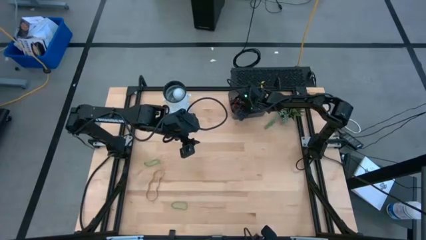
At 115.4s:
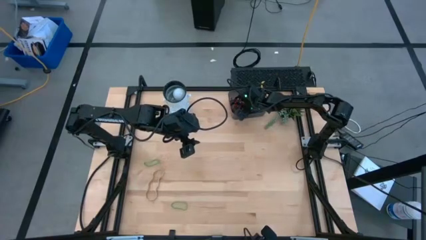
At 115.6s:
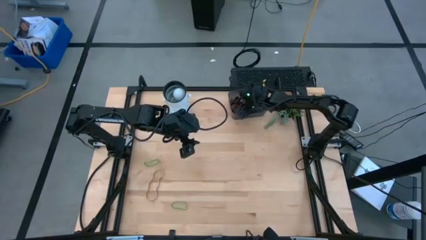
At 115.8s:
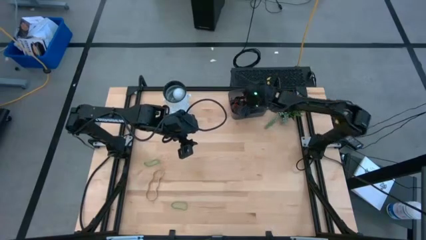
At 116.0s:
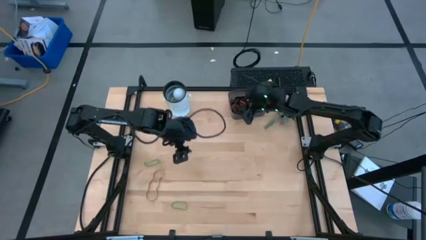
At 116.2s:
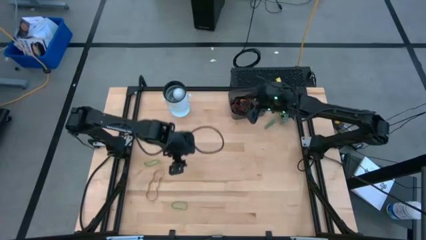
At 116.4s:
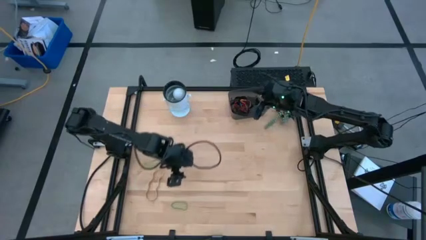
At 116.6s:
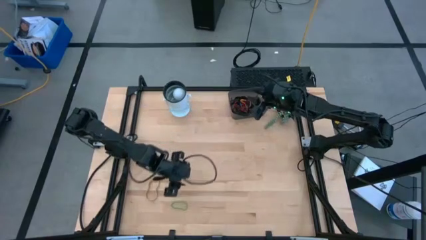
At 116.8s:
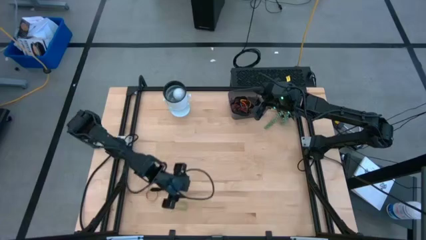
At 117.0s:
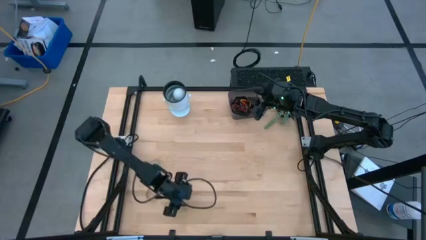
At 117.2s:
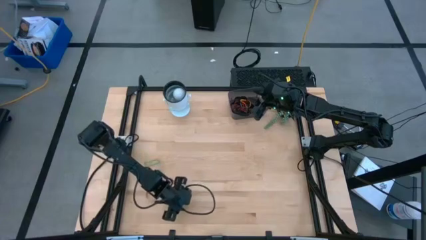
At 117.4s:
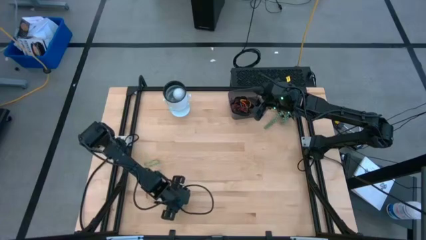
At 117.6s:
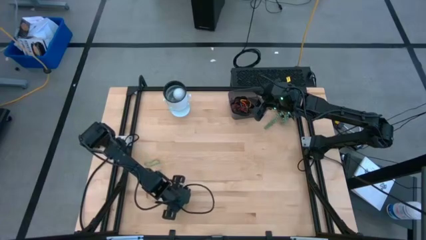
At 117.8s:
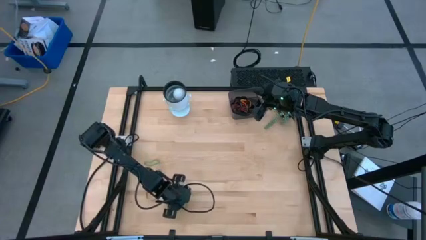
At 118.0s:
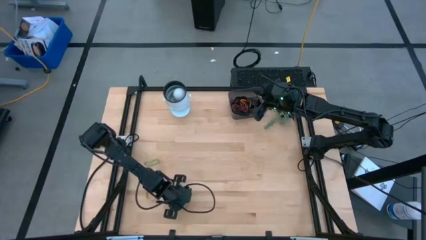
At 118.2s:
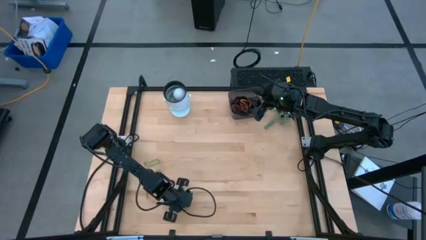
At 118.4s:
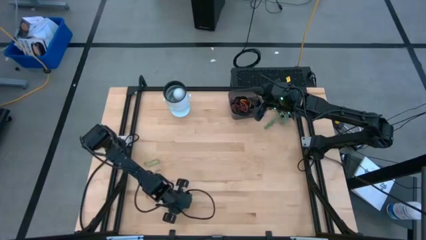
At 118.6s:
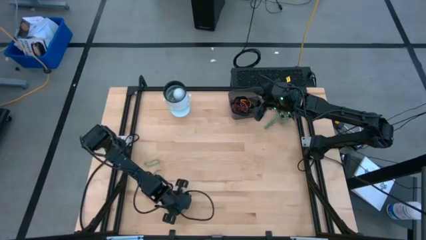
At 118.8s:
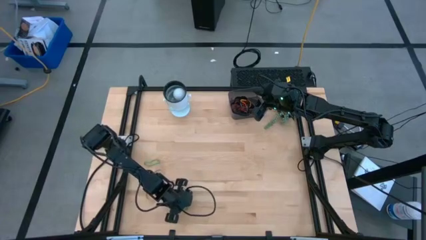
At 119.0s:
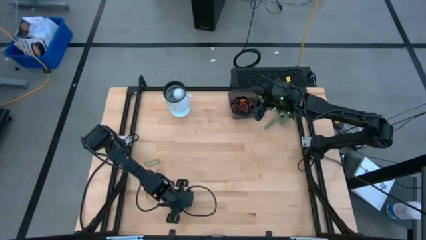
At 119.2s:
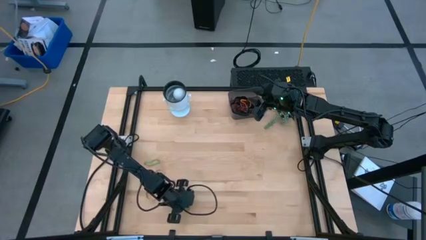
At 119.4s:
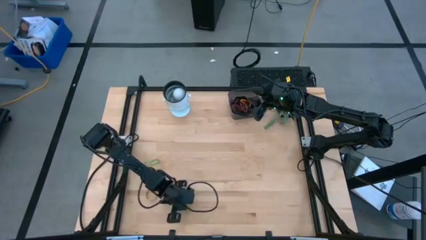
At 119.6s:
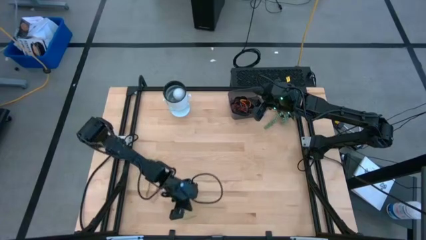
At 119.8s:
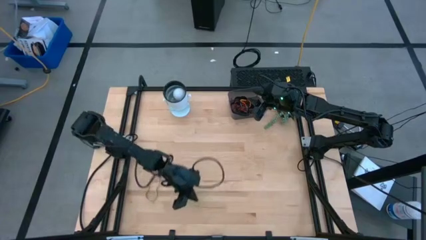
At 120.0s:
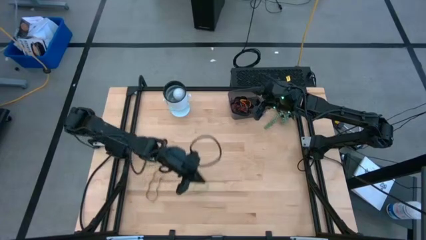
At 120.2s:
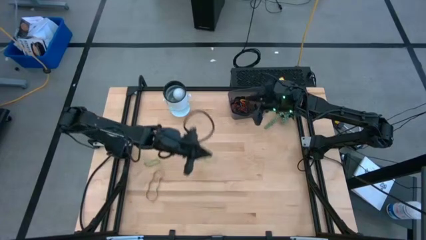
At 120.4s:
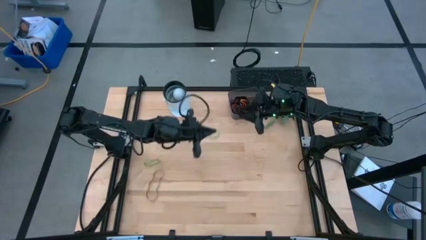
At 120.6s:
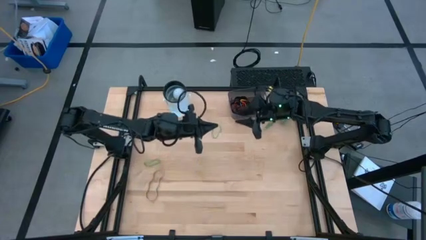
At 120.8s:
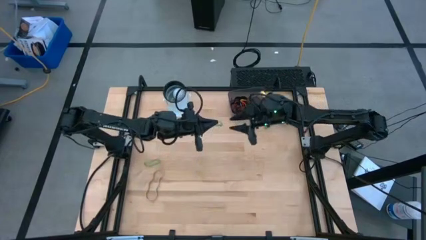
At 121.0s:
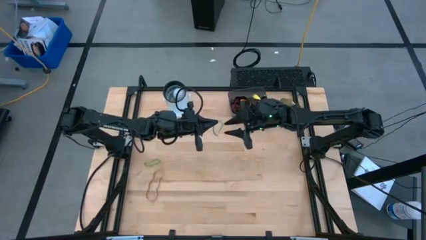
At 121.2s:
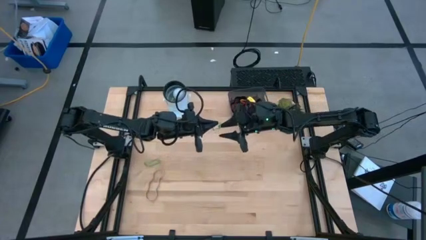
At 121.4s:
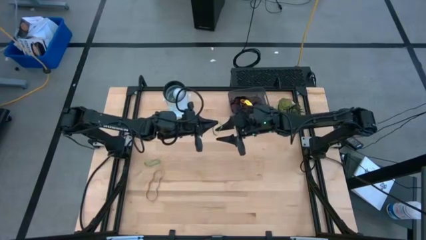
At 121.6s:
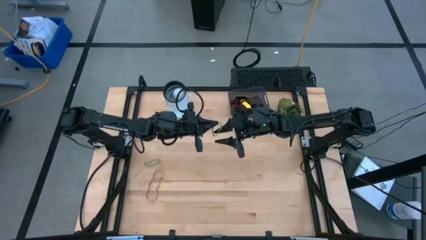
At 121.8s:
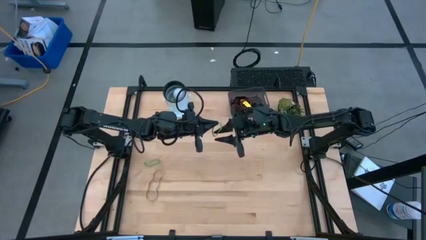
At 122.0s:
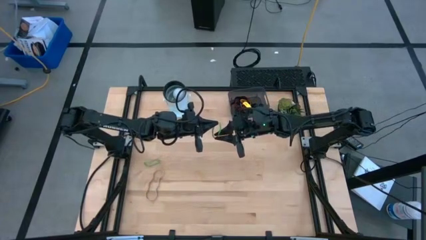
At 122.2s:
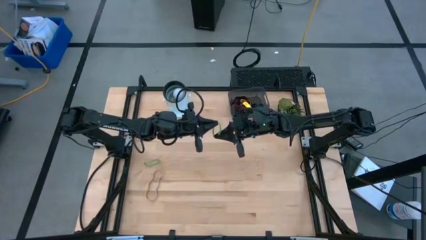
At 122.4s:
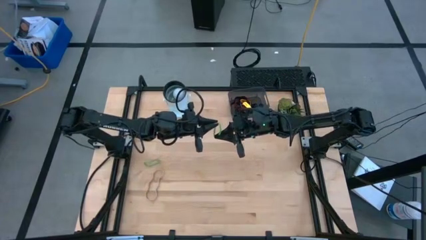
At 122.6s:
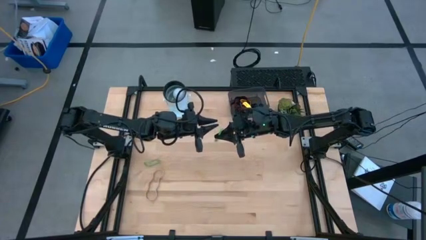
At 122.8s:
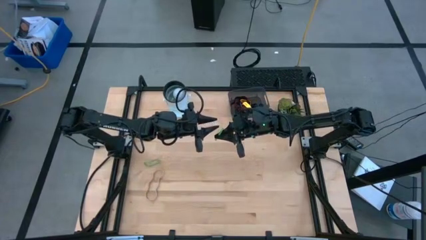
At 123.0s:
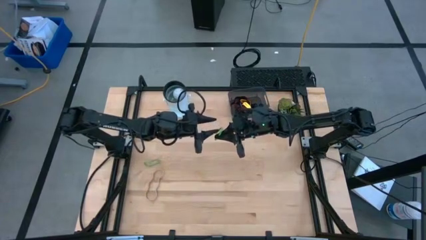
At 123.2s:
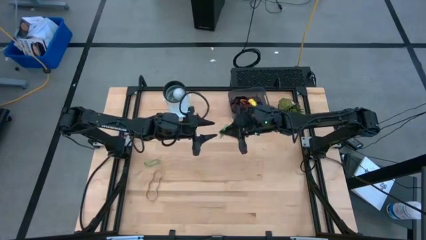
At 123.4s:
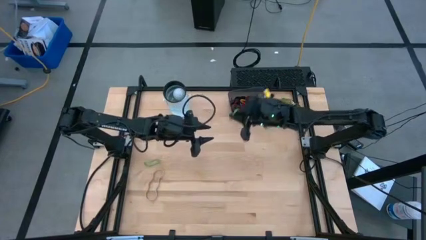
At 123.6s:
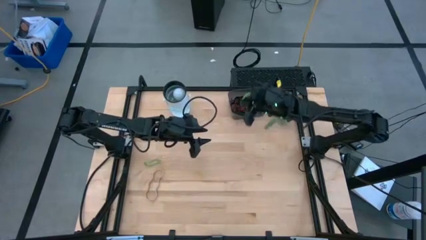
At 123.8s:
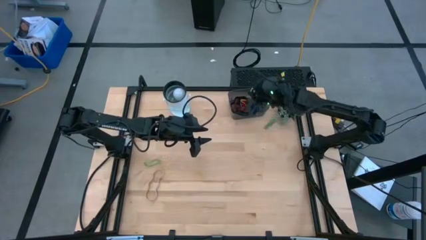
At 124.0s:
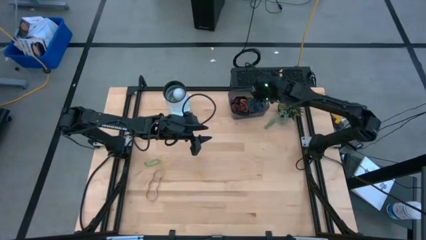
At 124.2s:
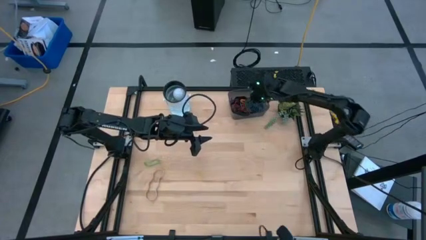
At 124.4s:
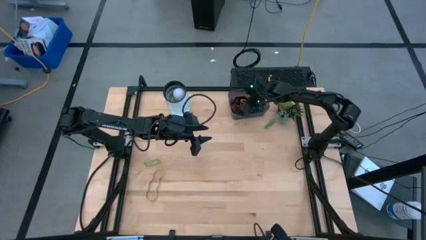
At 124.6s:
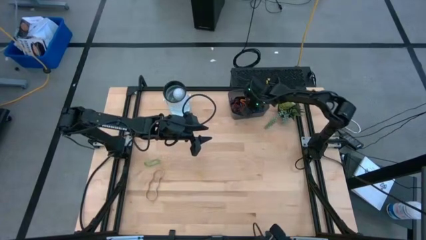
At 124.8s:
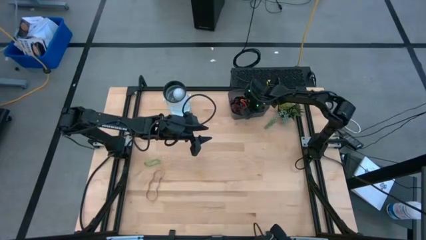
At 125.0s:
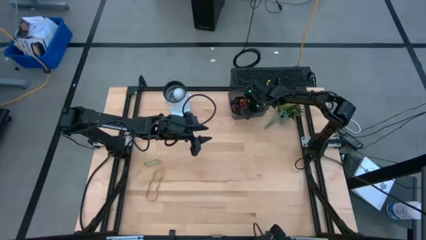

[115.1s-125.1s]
Task: Pick and place rubber bands into bin
Put the green rubber band into the black bin

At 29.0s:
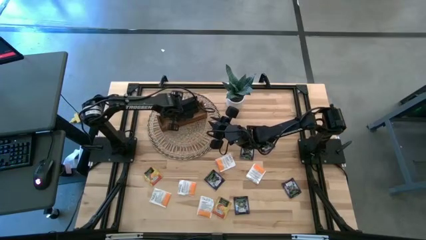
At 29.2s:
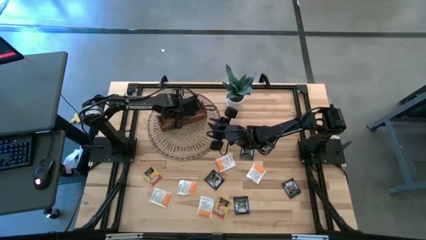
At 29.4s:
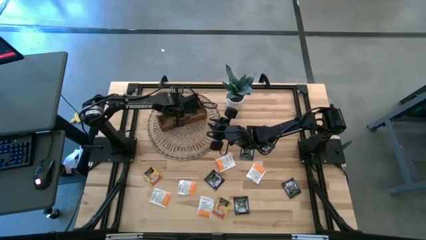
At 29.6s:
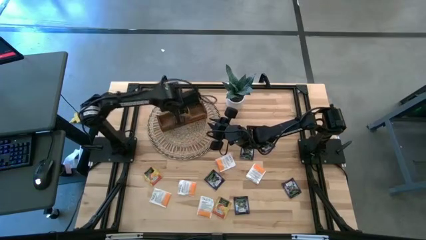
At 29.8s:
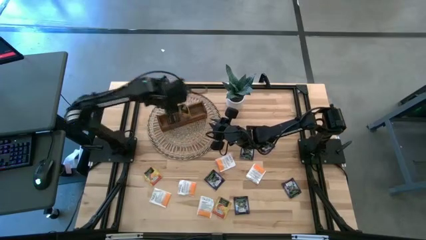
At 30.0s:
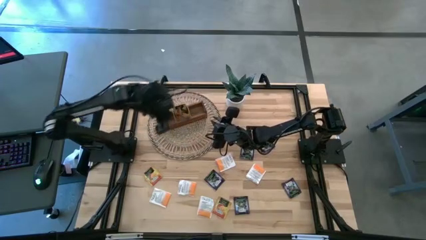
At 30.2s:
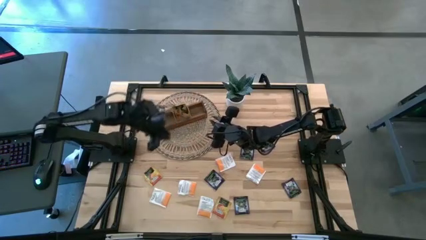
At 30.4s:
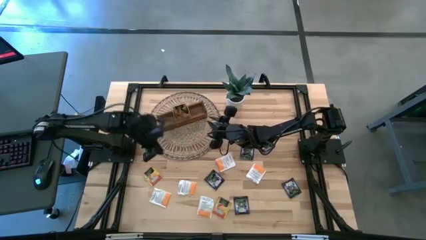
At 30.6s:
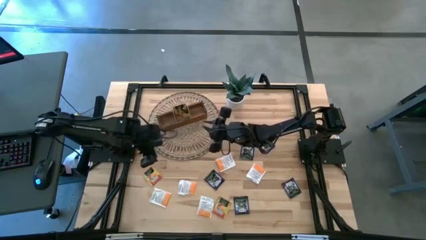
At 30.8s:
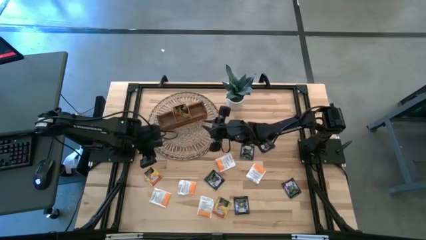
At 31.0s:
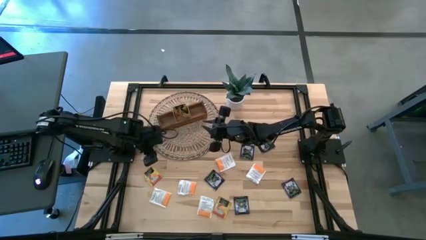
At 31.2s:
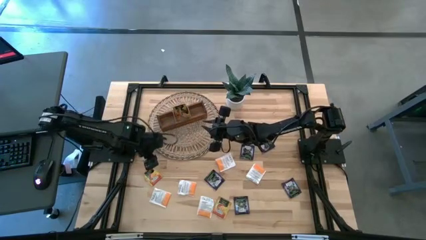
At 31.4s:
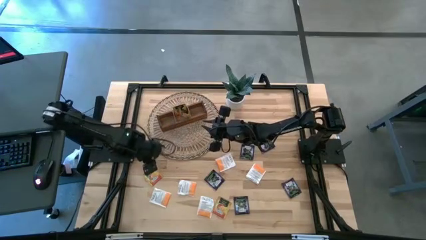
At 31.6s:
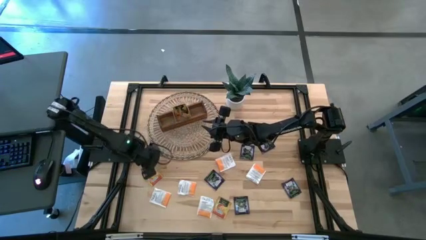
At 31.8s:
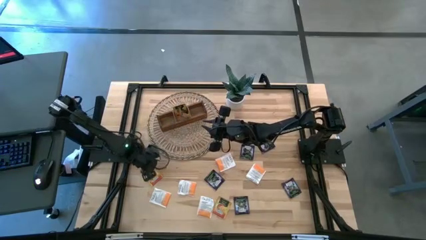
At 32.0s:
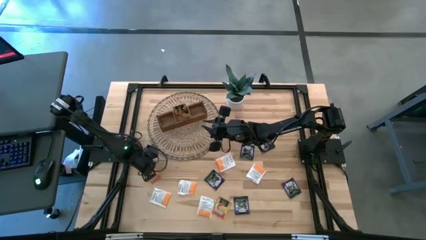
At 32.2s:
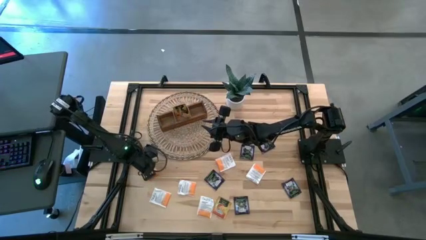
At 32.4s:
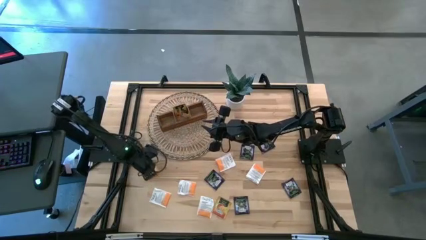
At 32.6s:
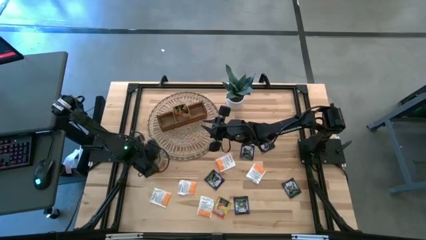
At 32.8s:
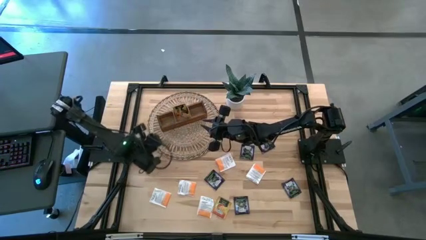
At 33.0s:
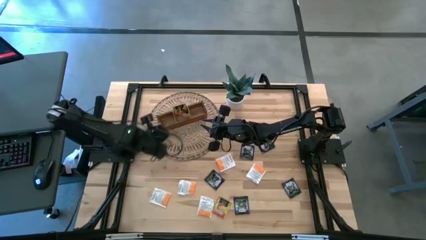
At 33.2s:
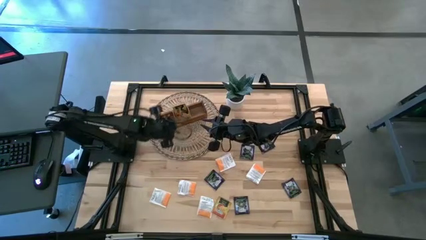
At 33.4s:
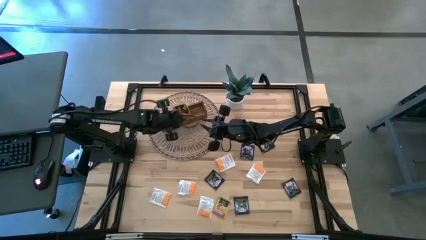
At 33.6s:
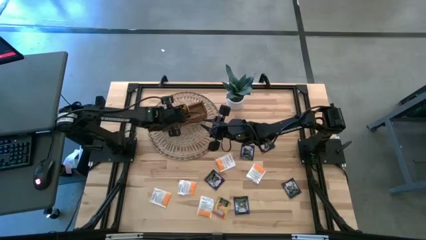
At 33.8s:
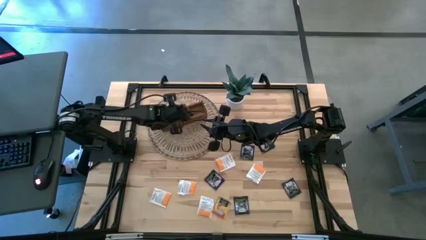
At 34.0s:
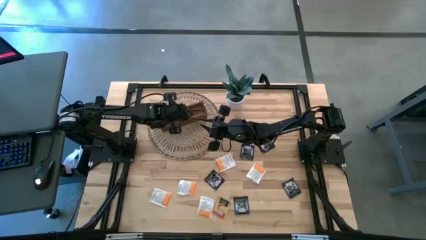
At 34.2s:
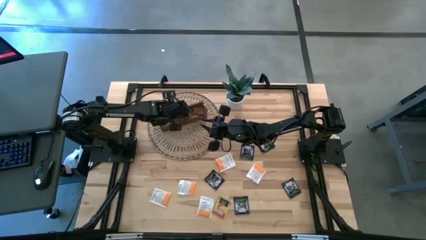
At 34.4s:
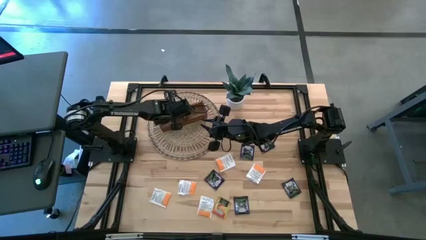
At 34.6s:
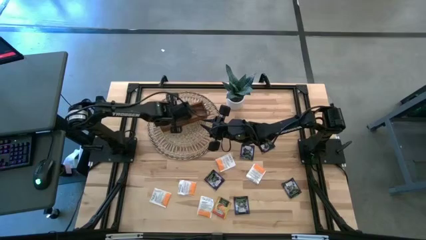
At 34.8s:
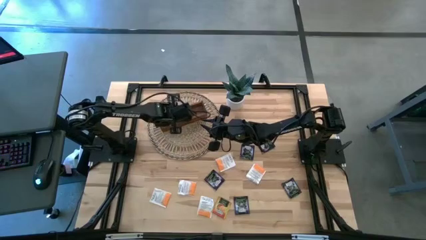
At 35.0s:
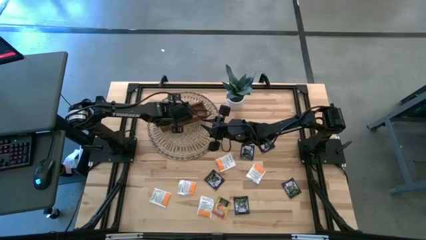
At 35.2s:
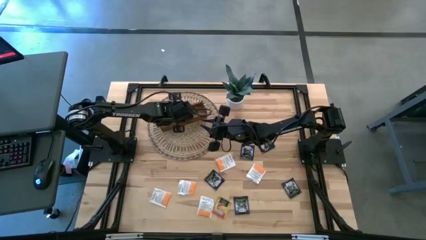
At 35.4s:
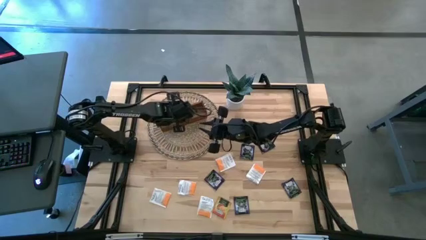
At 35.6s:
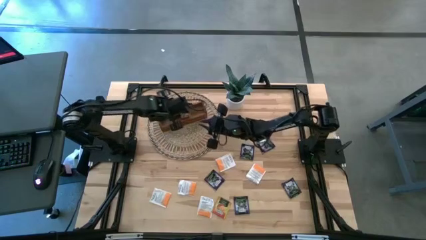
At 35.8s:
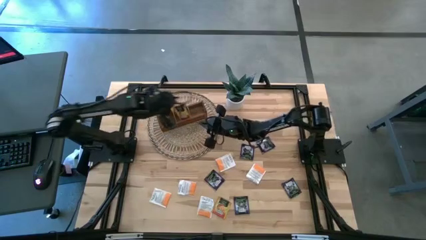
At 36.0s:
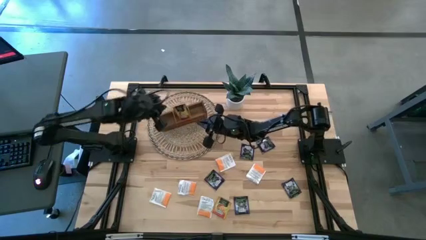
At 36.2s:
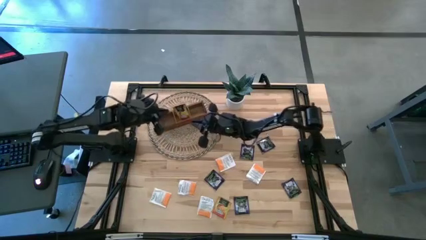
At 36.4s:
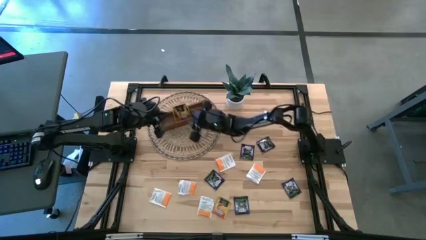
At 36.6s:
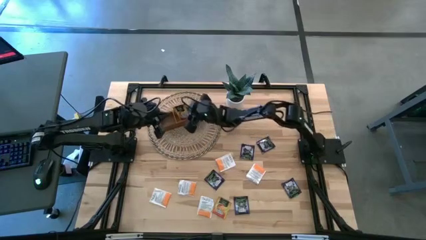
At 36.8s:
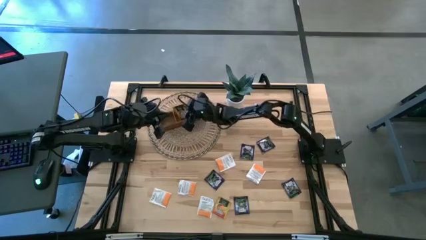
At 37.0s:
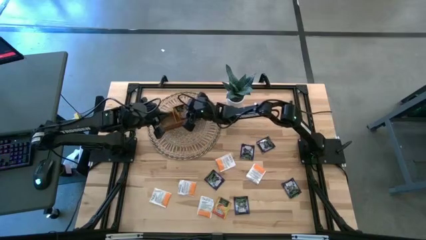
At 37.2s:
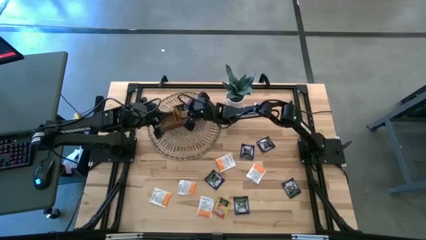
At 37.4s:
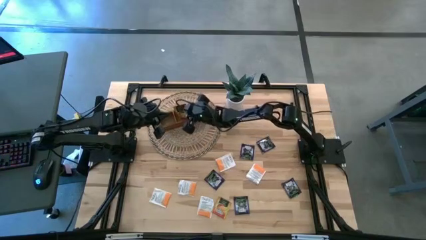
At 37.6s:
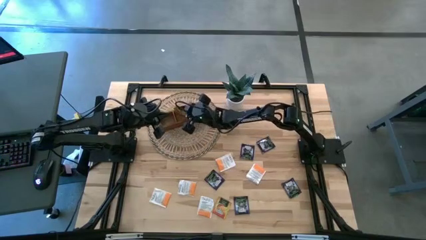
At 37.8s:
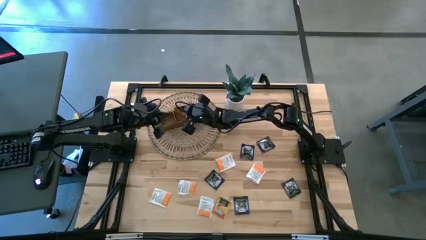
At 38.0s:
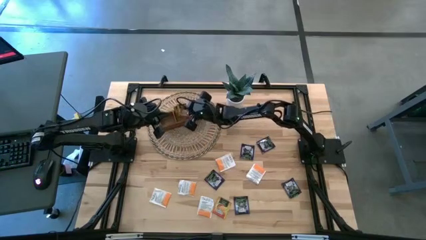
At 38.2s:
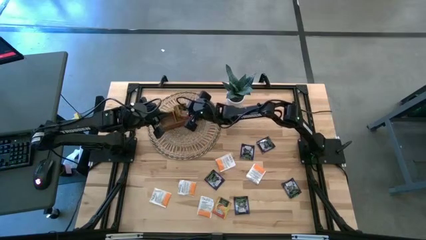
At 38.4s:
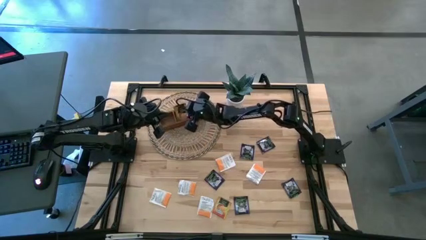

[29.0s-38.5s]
Task: Pick & Place Tea
Put the yellow tea bag into the middle section of the wooden organizer
